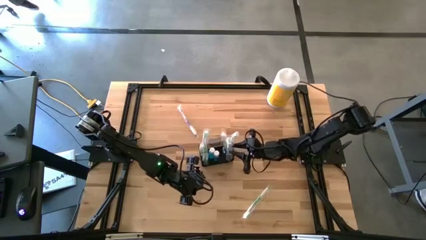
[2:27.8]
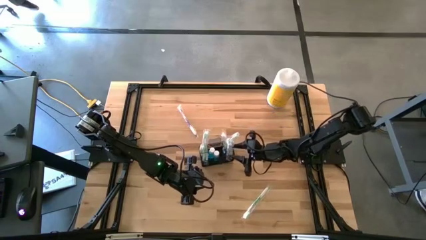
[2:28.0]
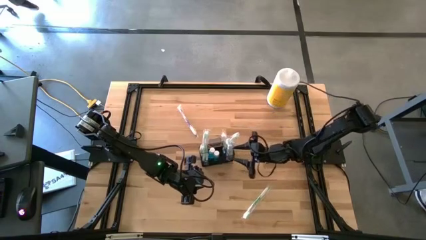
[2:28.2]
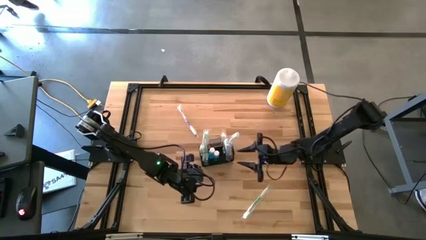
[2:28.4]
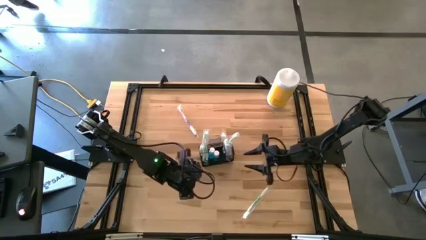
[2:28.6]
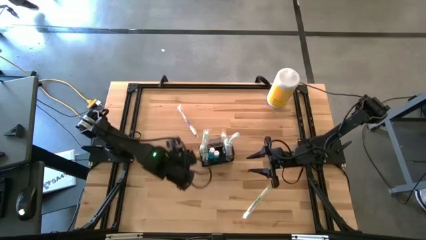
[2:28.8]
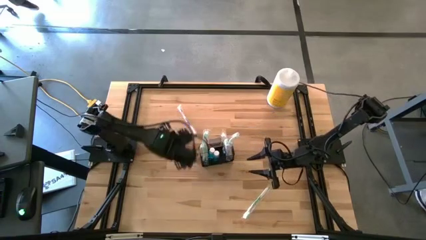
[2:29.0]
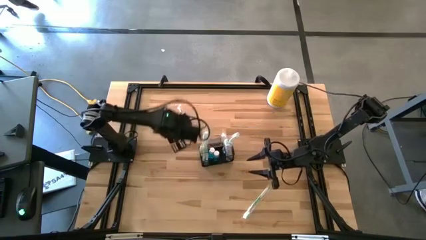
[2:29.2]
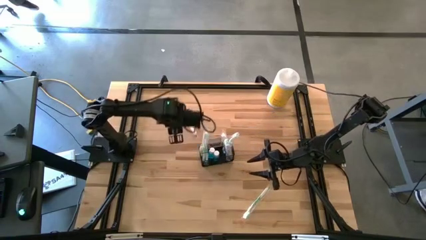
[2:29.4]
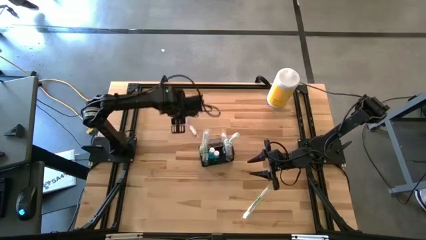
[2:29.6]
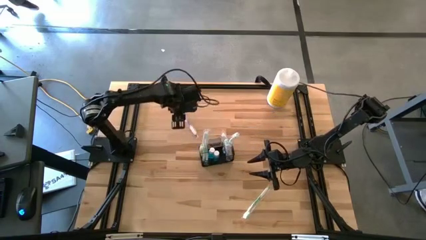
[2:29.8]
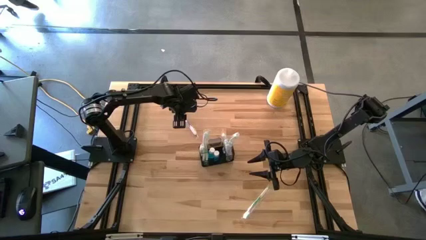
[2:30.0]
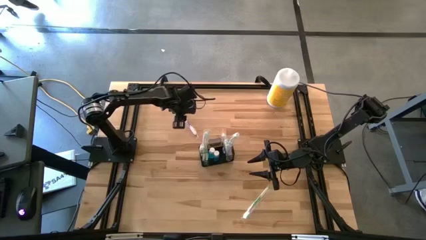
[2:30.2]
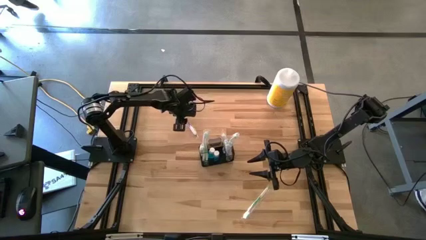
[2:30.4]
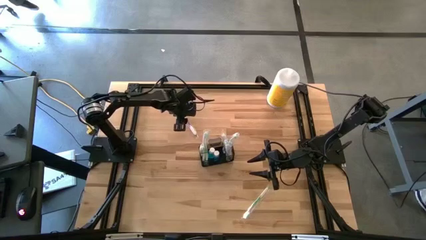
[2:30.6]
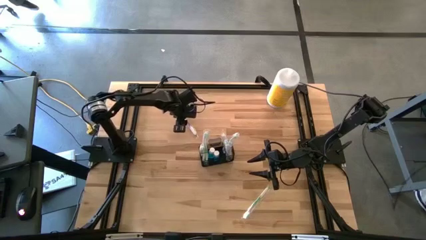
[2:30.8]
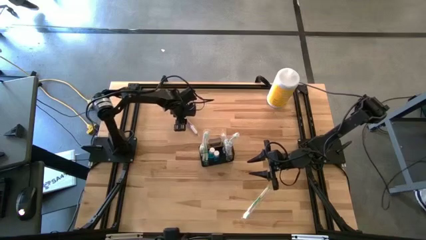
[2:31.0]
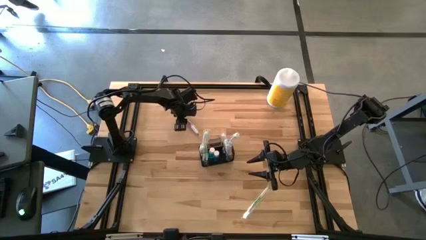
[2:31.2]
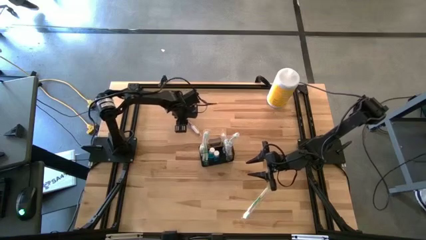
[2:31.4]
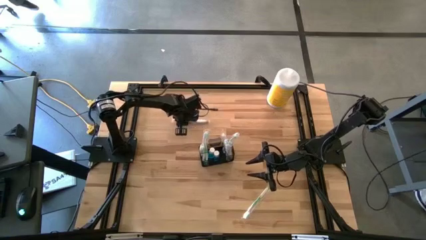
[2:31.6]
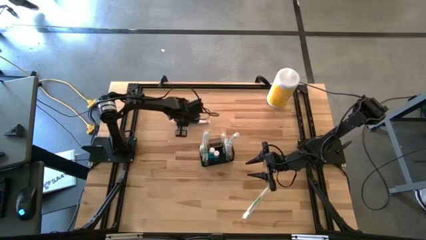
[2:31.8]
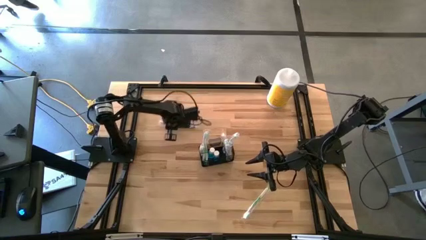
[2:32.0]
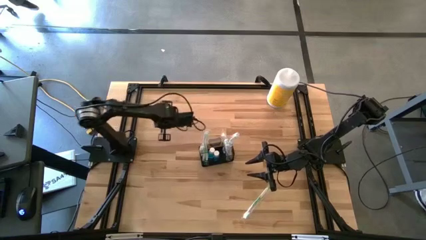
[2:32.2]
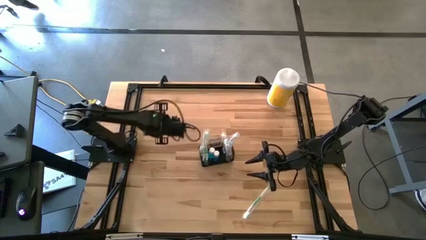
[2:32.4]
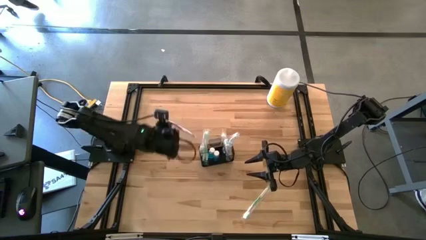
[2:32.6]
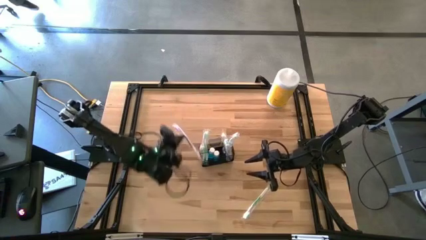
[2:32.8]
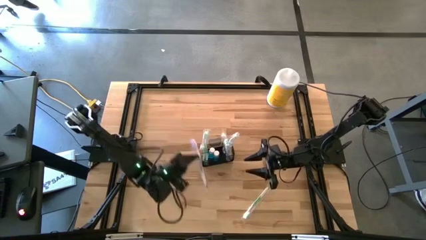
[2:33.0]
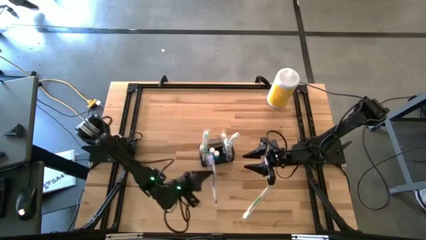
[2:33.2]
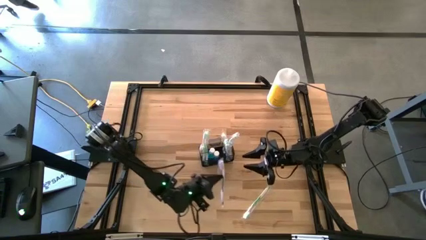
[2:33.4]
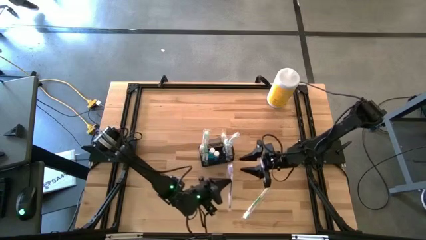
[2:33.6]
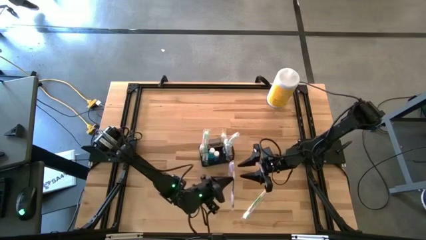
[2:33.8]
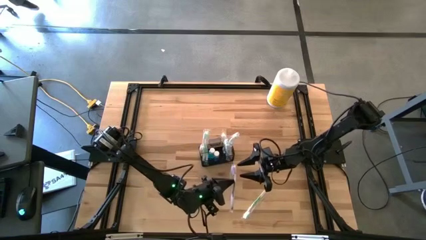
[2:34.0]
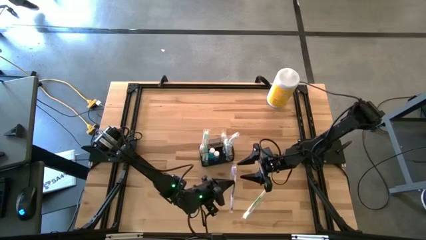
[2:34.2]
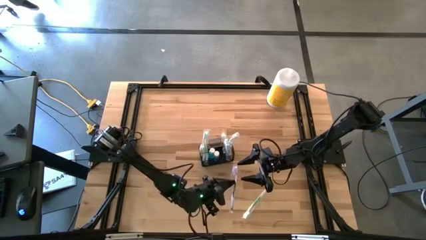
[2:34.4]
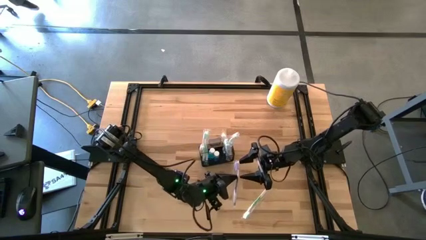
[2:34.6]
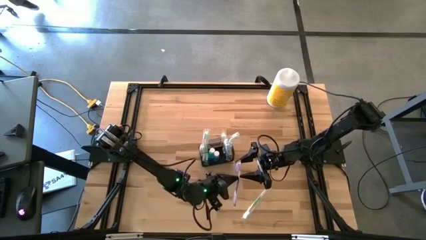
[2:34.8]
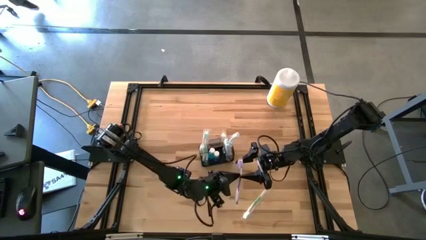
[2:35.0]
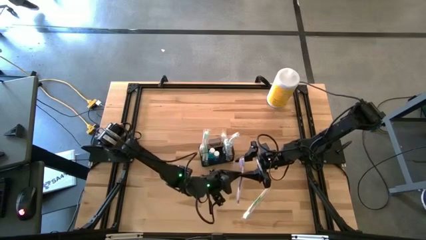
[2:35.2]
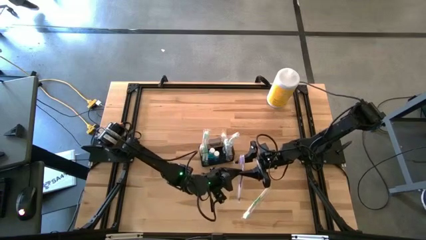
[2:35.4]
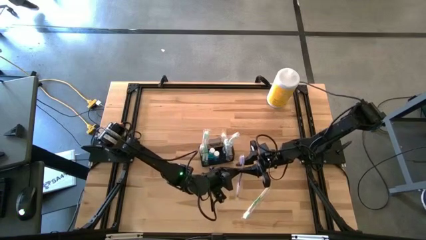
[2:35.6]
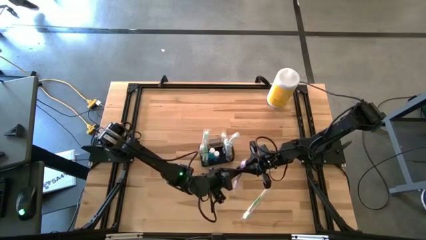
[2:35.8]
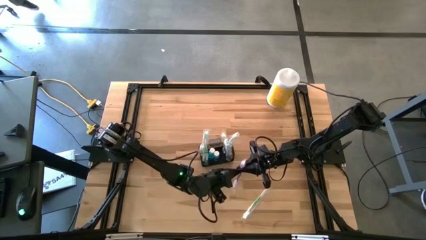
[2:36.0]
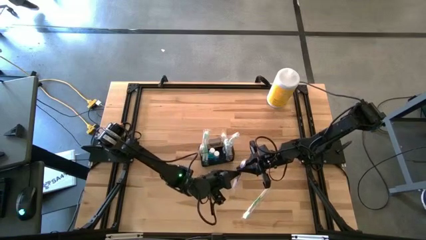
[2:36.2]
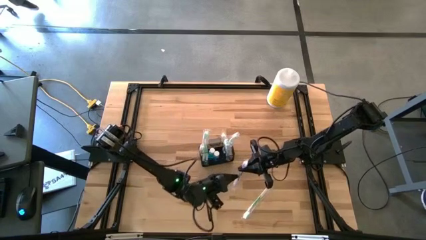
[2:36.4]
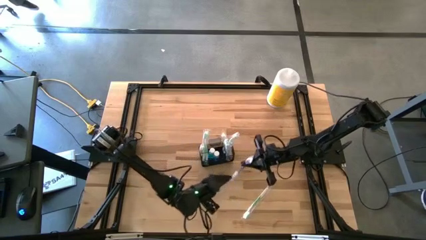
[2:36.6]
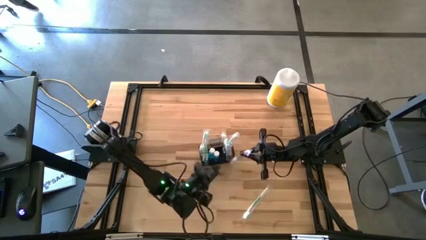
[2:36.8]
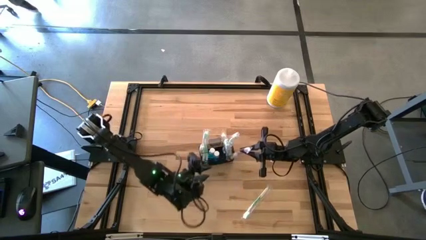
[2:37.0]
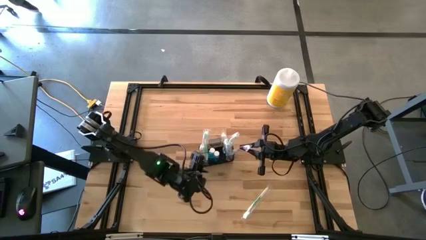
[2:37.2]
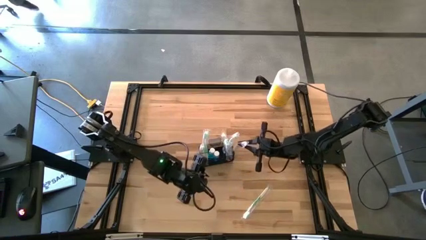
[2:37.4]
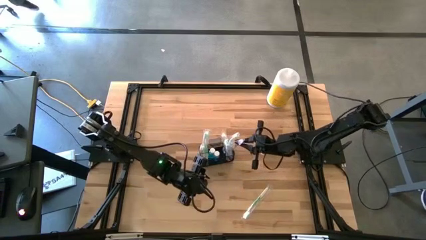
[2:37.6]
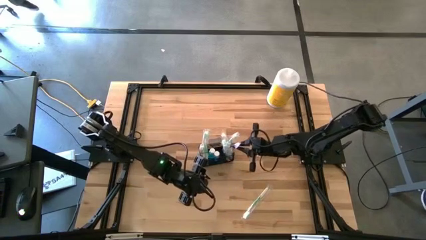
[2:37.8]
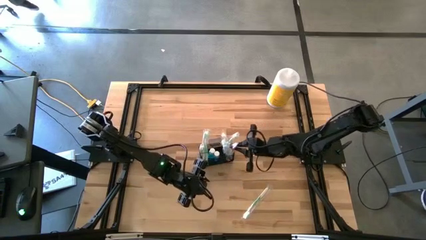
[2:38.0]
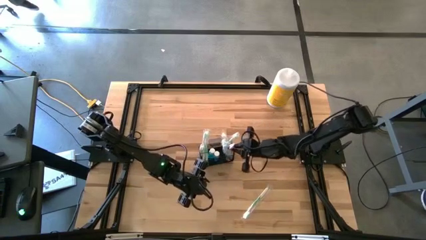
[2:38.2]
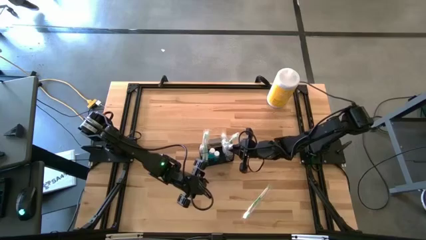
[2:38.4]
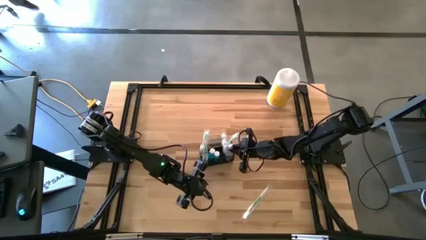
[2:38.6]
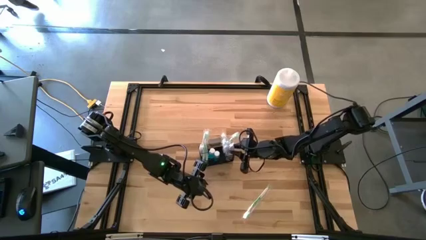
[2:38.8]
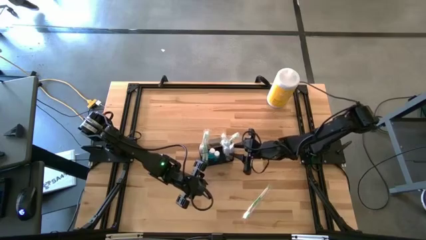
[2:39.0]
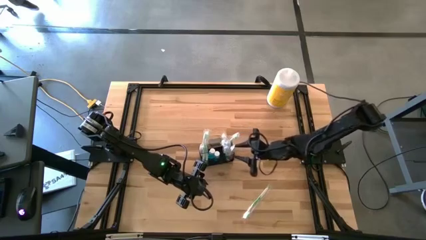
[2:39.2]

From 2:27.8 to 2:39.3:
Task: Pick & Place toothbrushing station
Put the purple toothbrush into the black mesh organizer

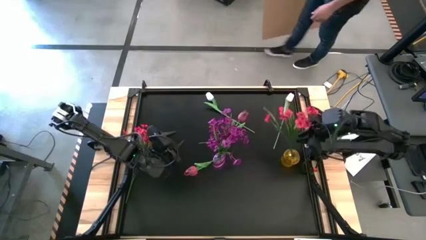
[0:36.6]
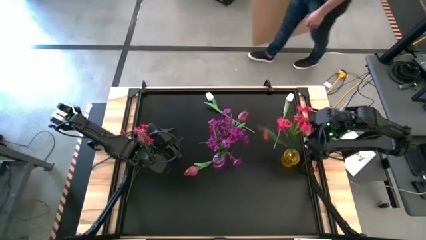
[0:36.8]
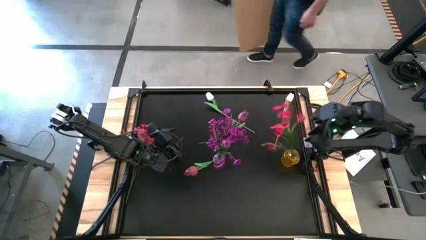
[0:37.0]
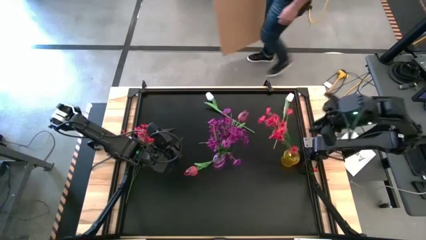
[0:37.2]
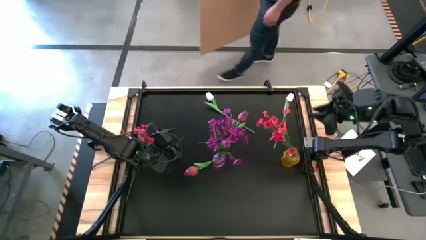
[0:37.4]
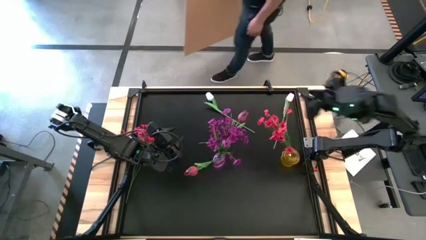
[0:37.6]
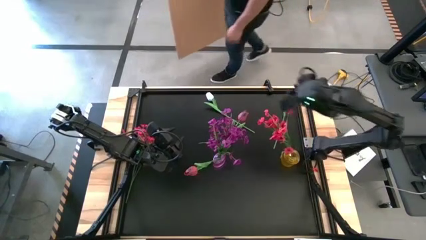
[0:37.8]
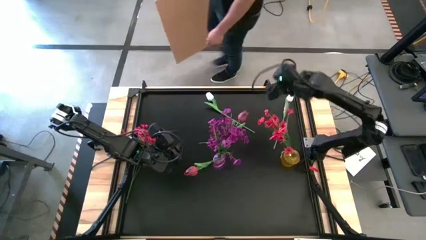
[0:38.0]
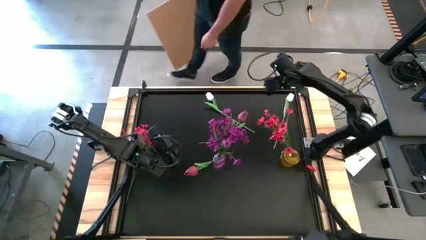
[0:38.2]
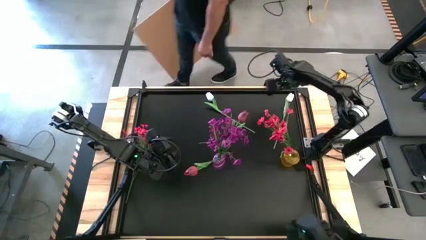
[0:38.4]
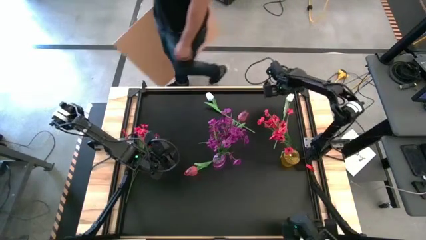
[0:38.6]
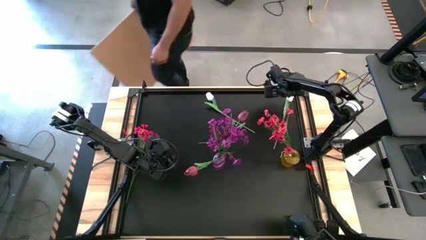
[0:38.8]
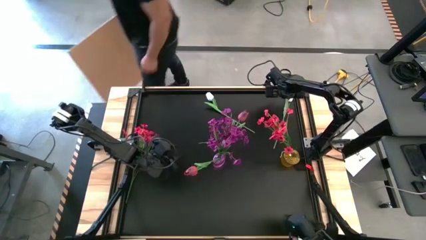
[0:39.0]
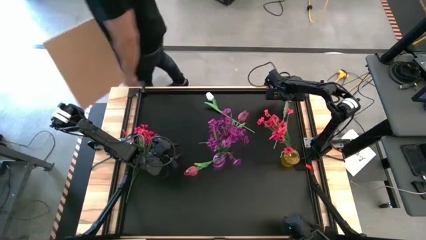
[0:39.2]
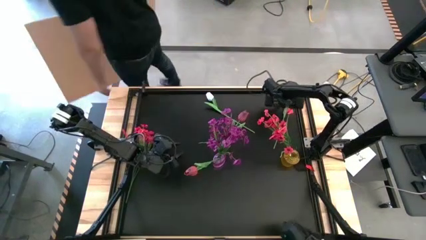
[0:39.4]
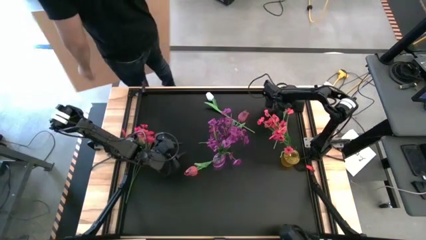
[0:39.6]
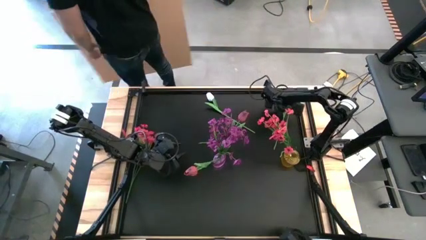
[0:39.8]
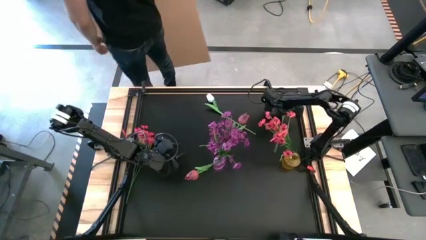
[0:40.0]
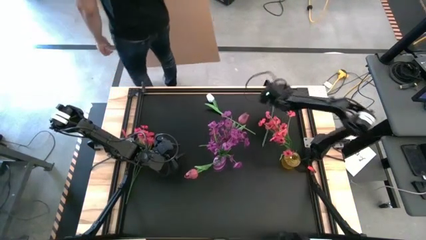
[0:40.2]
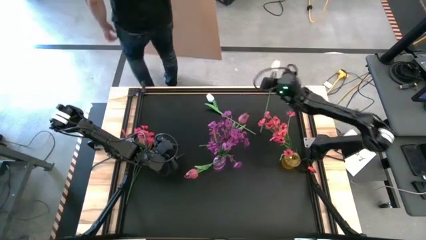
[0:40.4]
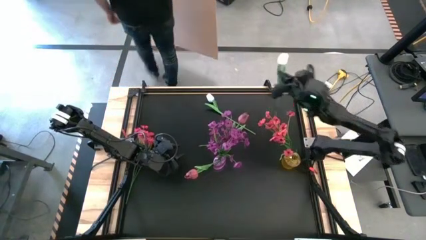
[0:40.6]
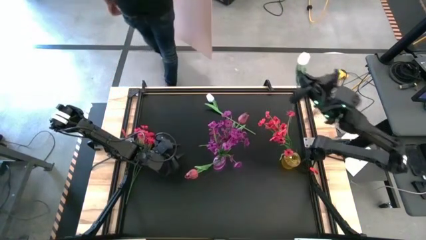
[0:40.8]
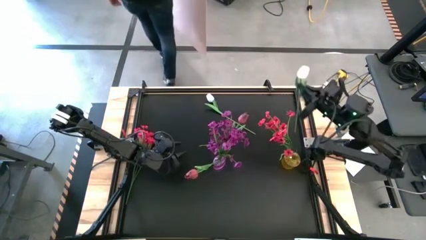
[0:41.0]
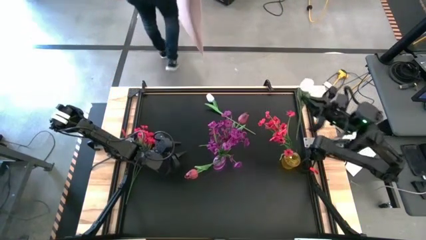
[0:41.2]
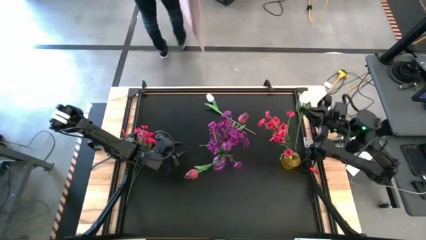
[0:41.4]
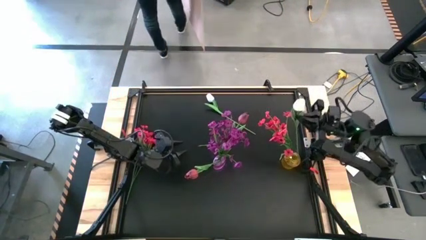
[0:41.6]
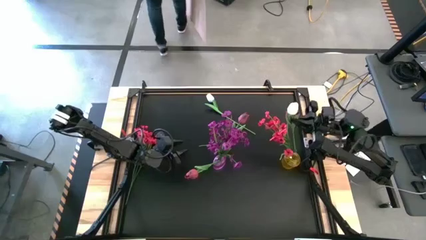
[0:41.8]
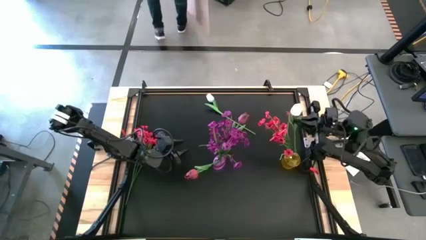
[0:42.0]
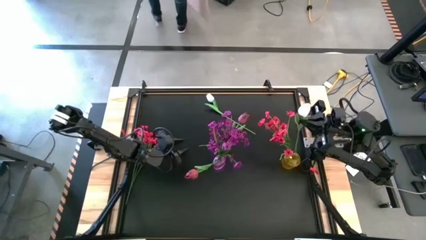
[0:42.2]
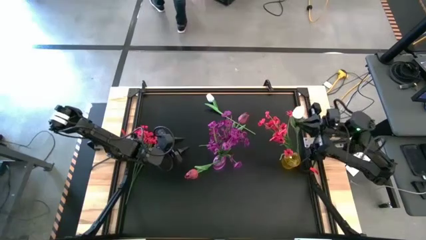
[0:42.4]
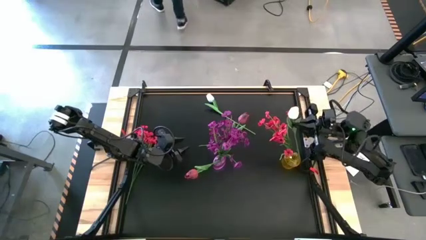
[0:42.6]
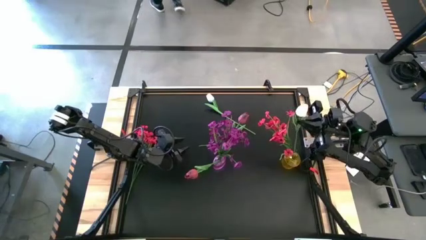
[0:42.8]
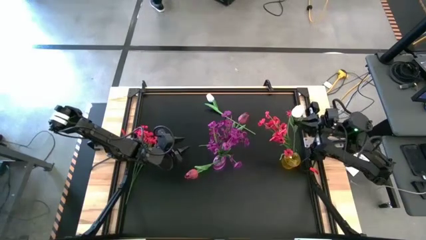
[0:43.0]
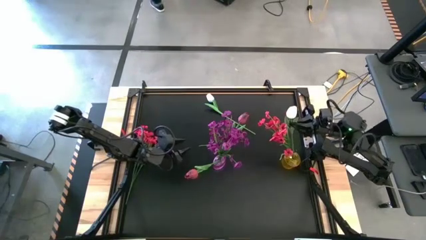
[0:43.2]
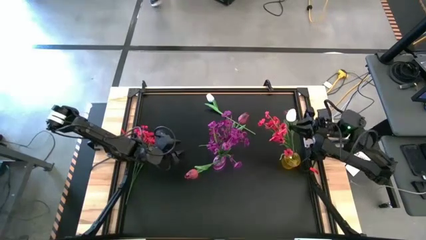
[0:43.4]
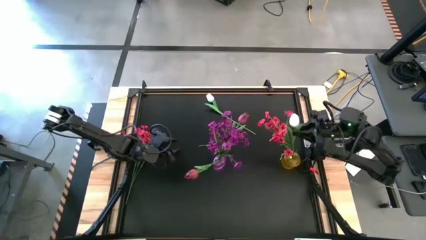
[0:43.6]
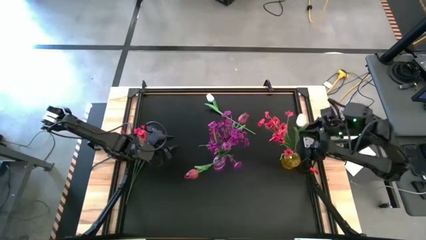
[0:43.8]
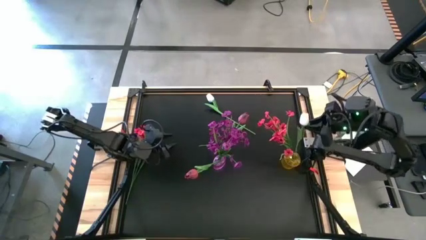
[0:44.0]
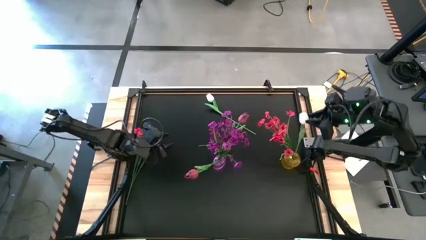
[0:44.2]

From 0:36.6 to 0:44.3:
Task: Sort flowers into vase by color
Put the right white flower into the yellow vase
